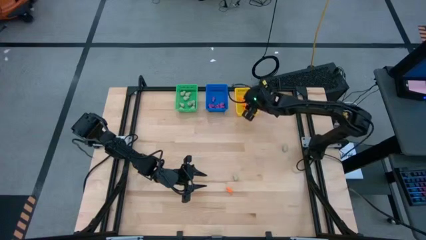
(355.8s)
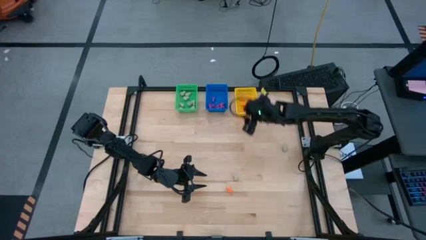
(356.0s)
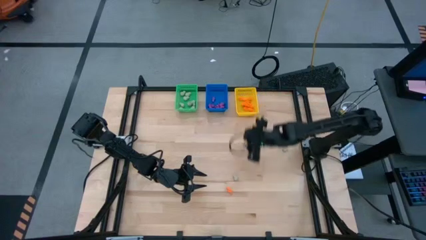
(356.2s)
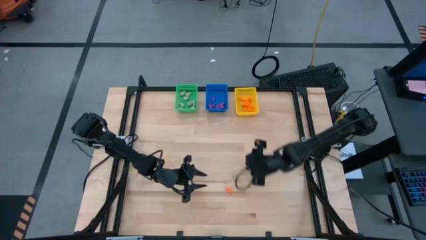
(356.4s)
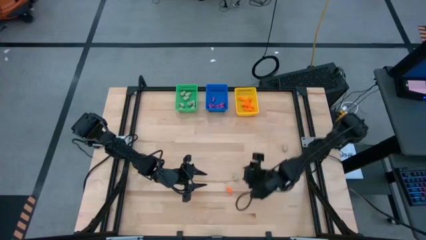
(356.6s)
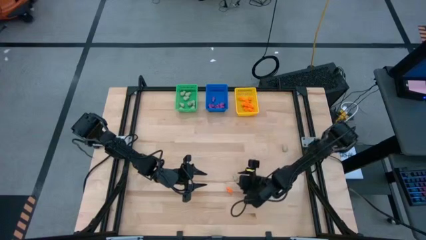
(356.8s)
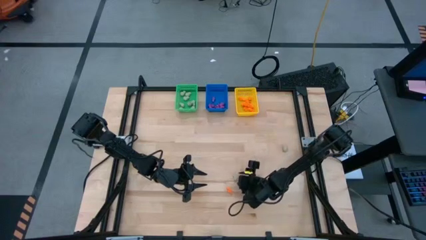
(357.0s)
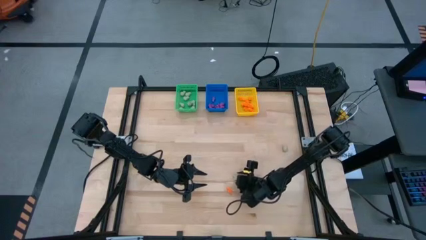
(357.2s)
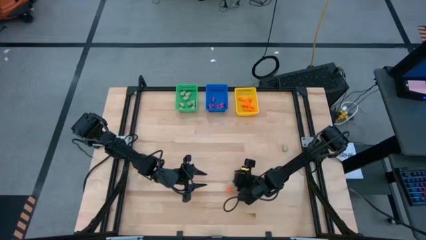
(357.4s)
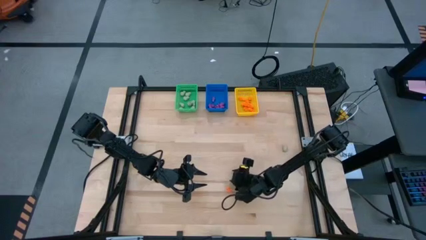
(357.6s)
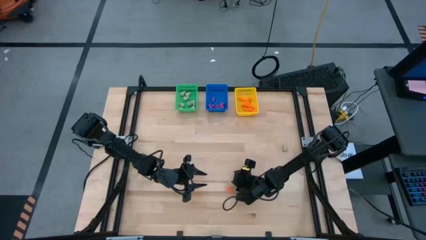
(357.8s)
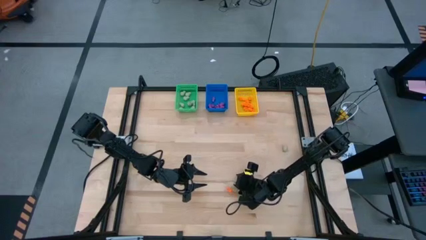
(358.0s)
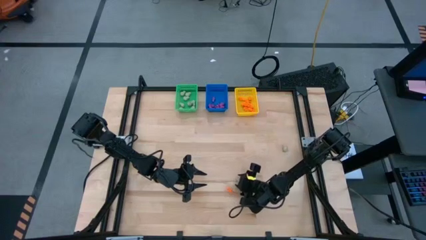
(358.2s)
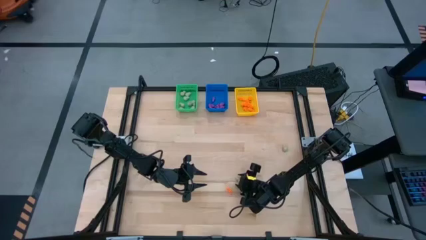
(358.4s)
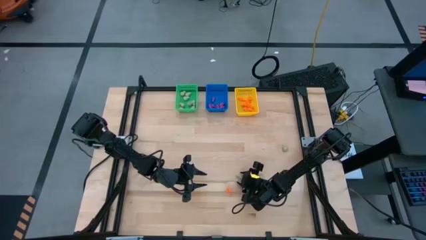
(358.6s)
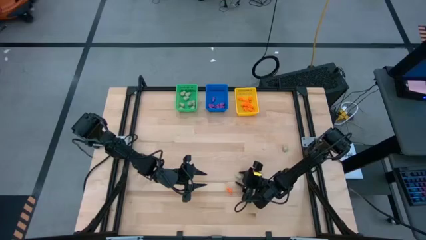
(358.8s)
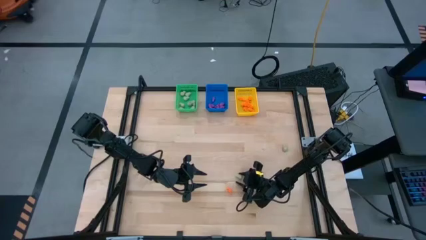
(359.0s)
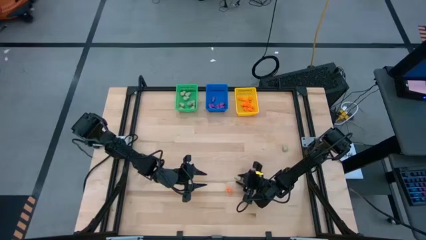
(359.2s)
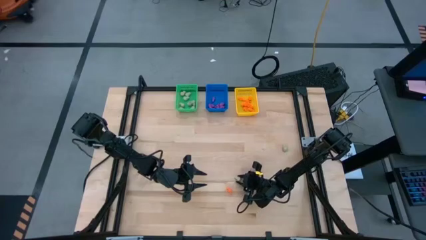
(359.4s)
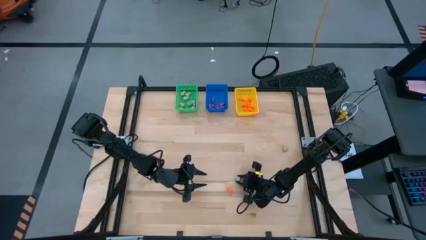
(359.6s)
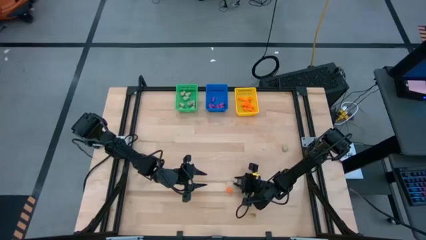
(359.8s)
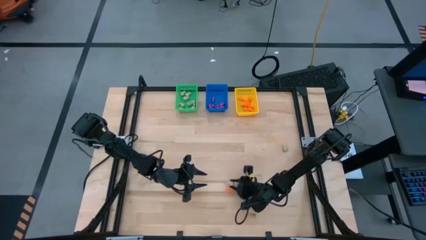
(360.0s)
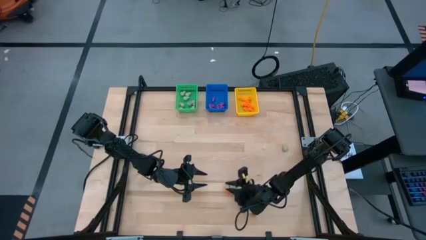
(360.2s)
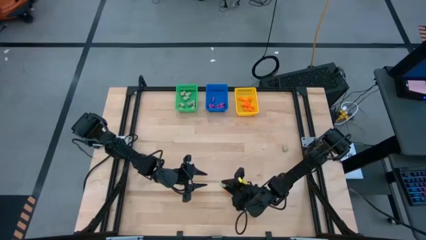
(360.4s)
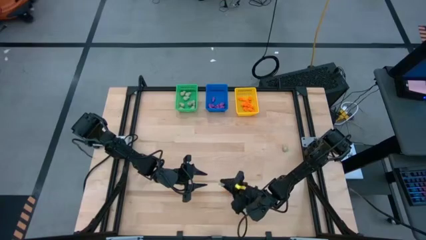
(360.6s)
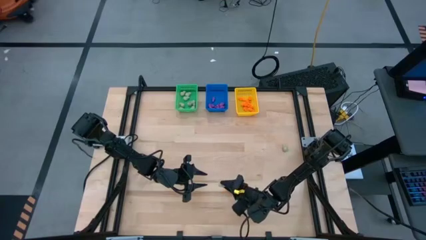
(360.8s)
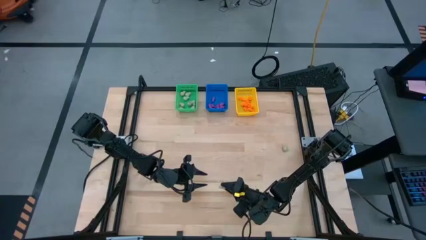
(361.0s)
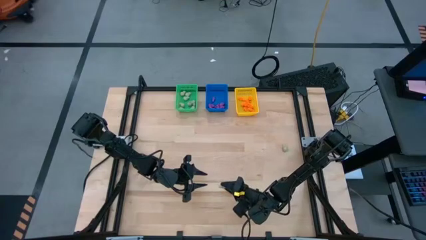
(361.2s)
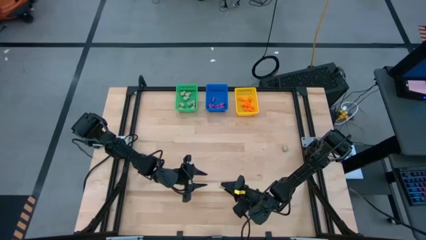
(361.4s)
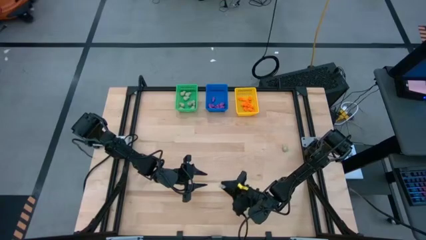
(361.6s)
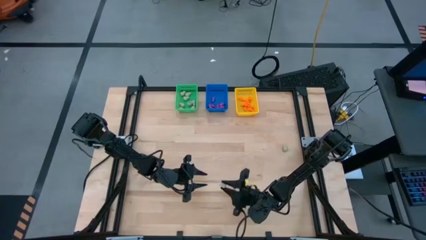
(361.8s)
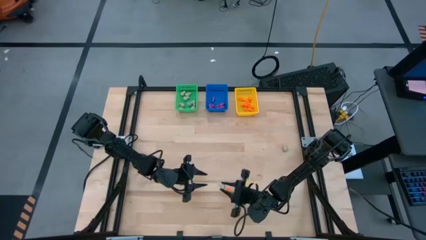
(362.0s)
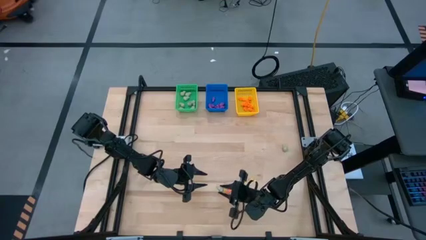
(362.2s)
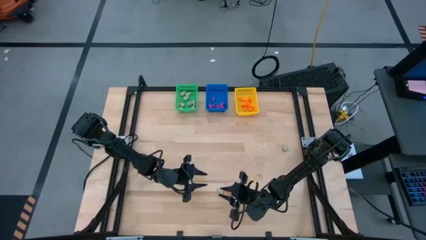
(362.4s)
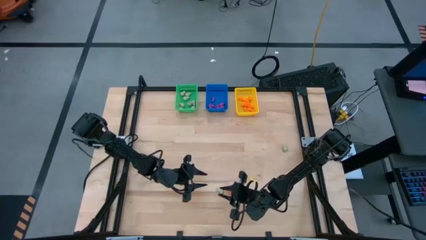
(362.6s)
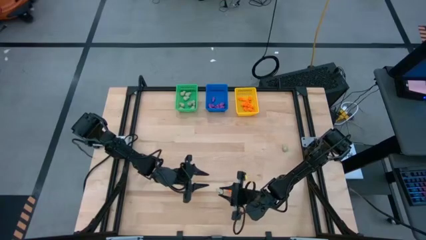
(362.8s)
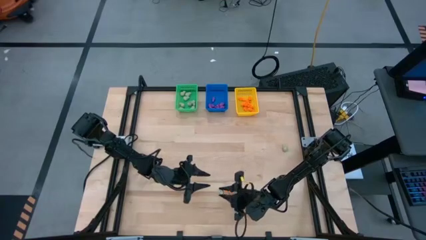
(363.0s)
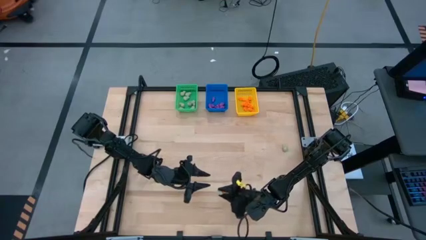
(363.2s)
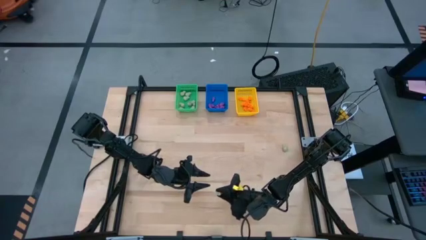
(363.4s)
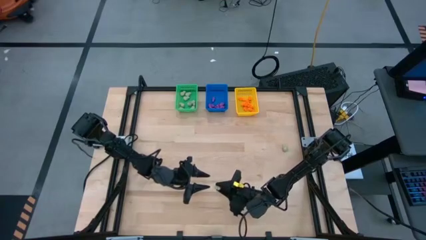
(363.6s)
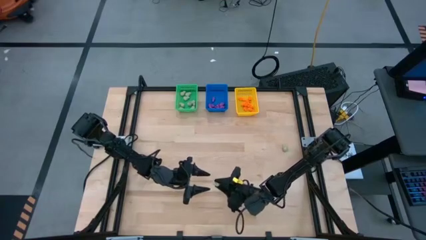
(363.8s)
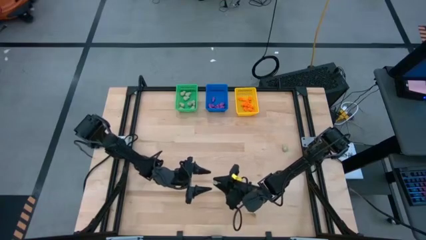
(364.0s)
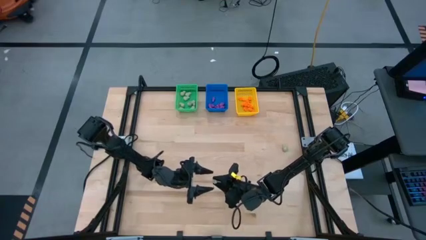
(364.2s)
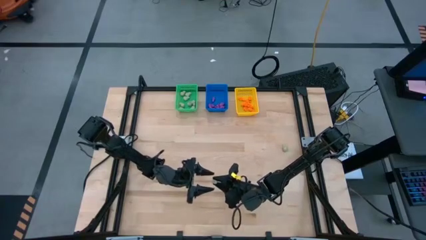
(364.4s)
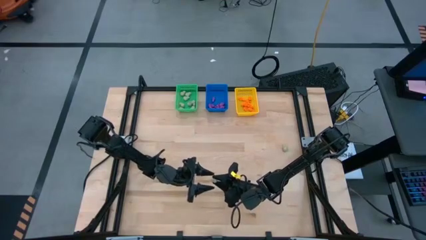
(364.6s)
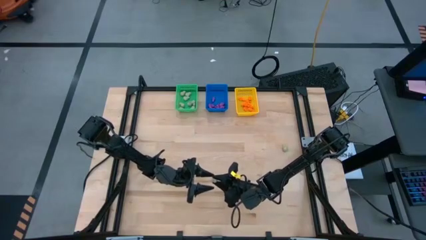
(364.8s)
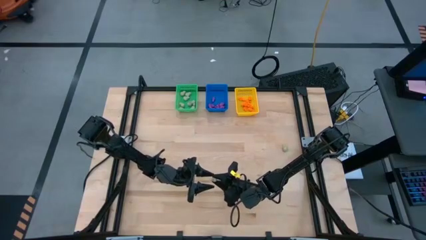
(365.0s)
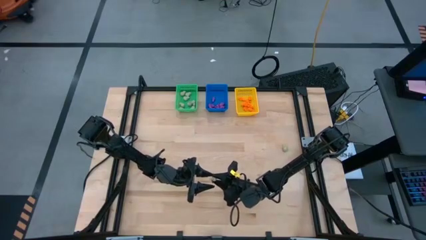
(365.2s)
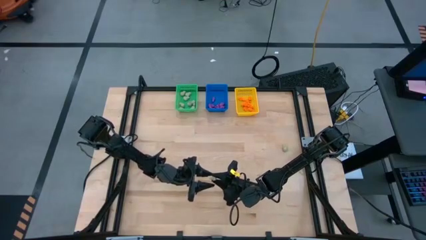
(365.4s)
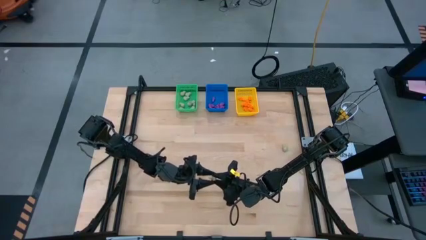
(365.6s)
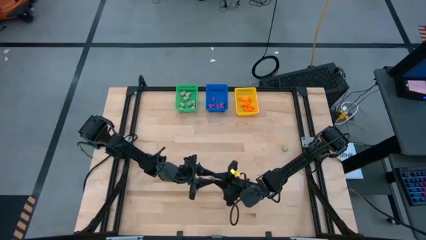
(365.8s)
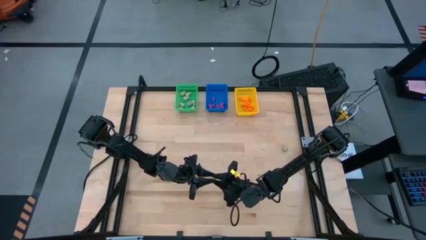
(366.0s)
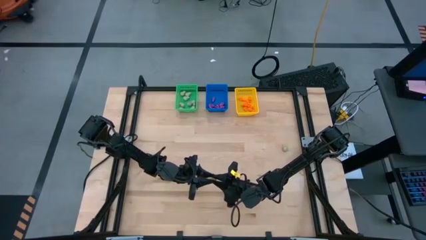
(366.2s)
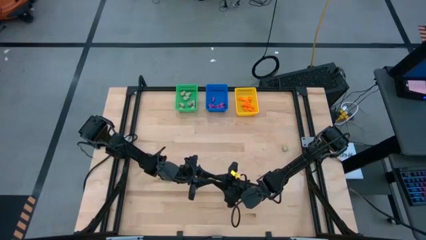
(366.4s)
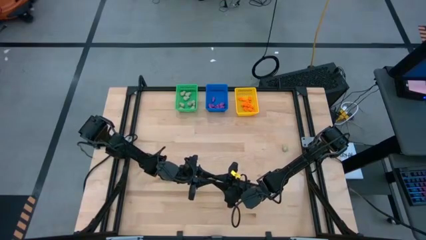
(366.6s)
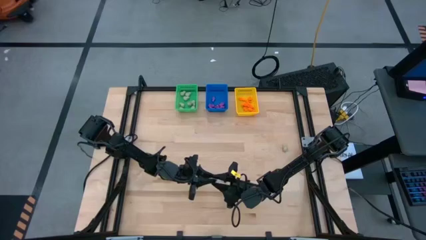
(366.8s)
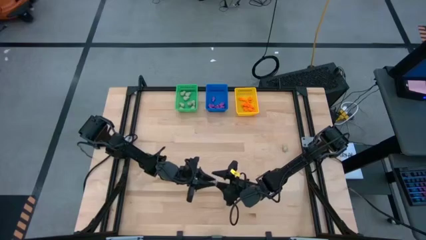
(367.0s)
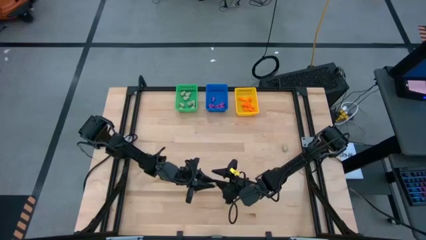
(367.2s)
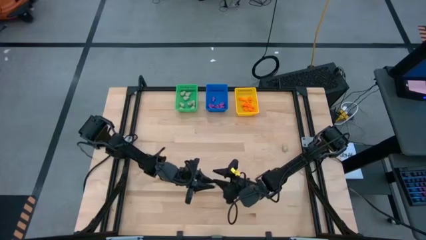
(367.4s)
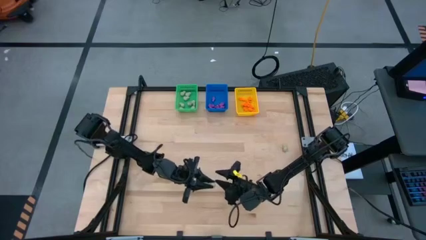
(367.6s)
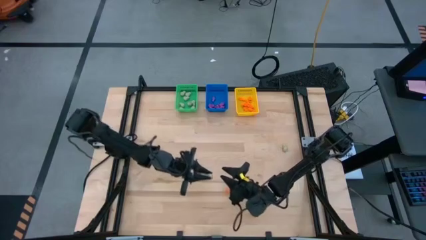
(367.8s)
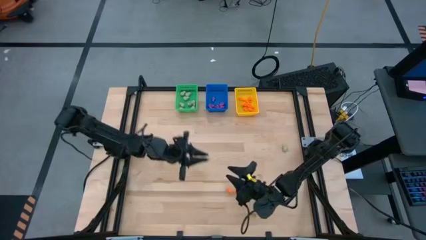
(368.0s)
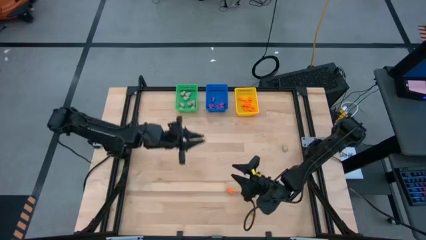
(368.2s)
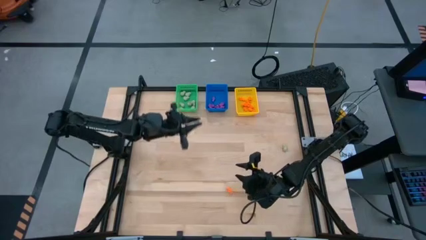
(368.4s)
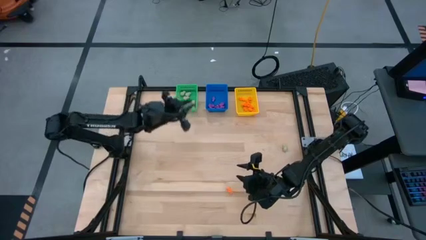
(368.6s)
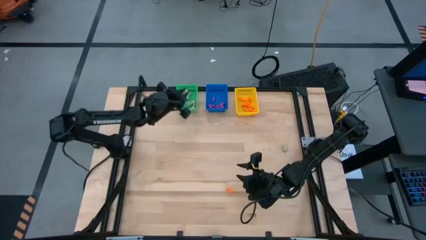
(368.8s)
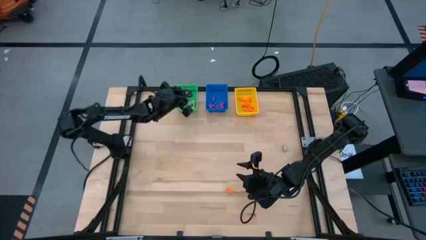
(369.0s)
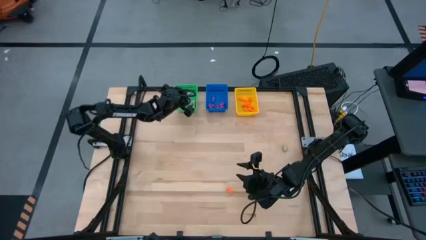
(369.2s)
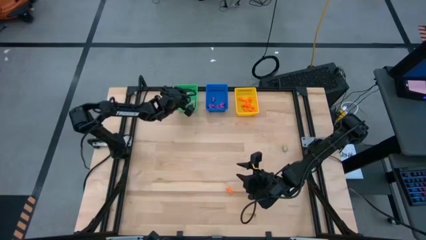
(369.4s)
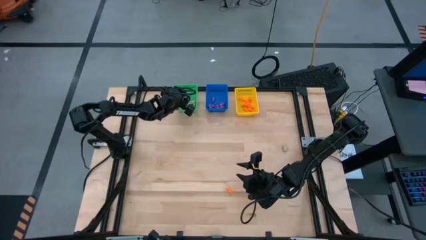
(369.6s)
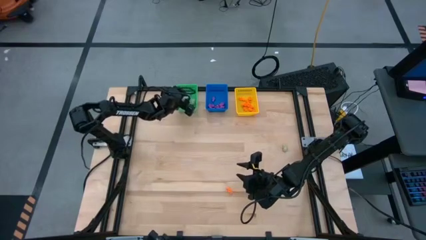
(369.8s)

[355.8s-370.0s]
Task: Sort Halloween decoration
Put the gray skull toy into the green bin

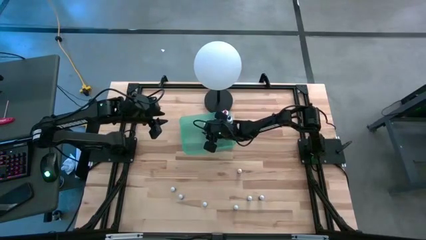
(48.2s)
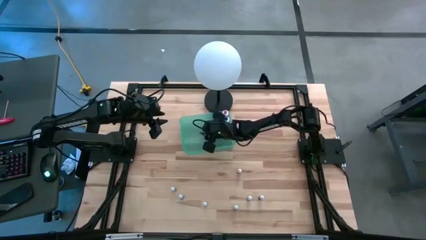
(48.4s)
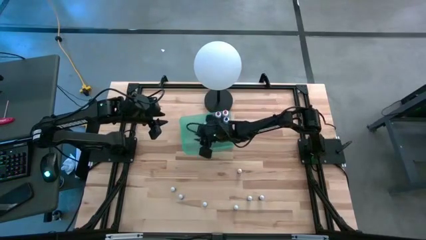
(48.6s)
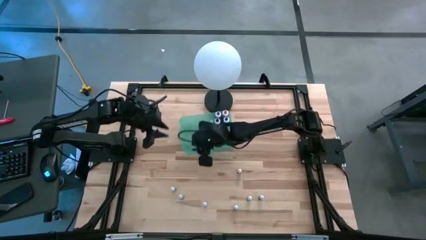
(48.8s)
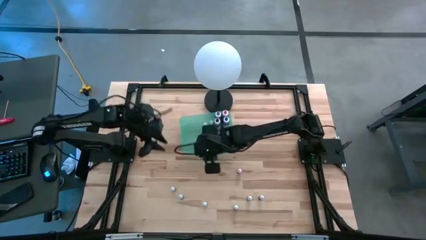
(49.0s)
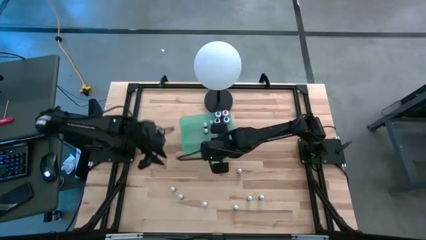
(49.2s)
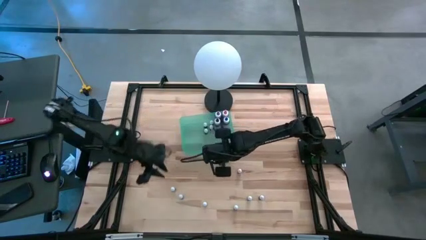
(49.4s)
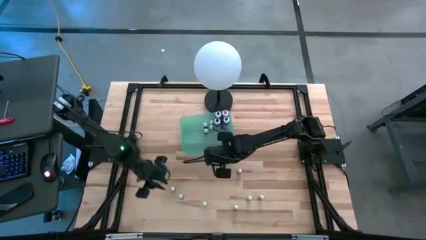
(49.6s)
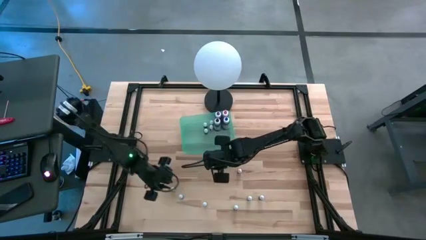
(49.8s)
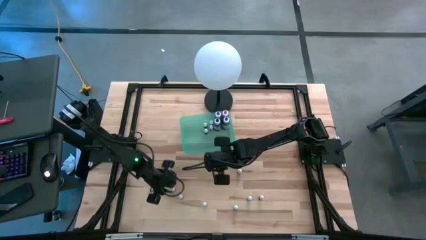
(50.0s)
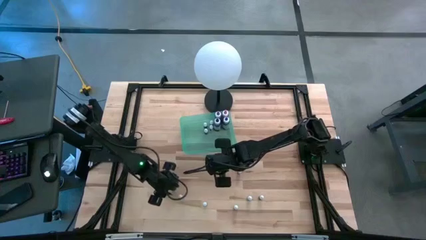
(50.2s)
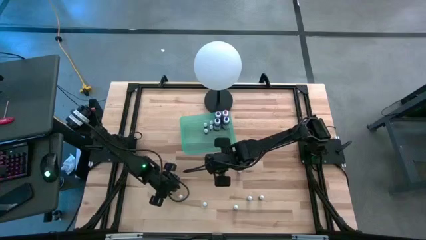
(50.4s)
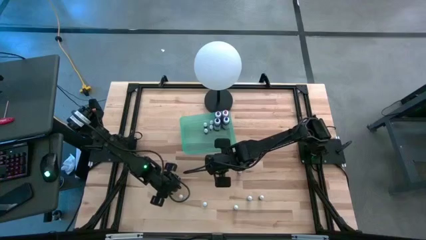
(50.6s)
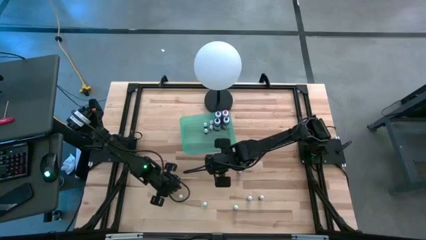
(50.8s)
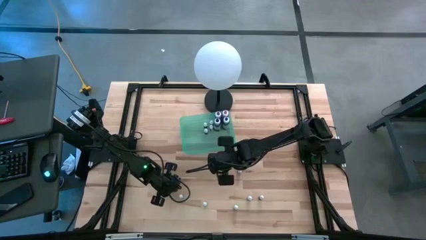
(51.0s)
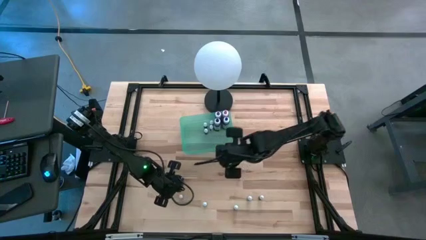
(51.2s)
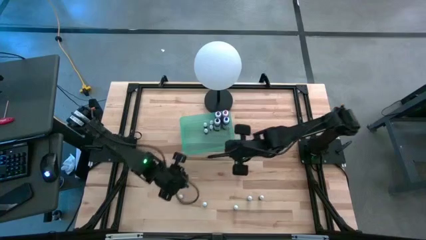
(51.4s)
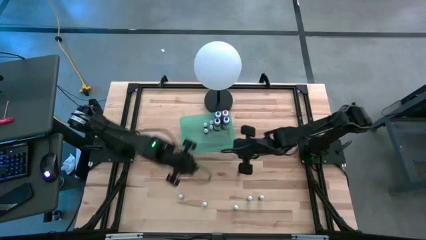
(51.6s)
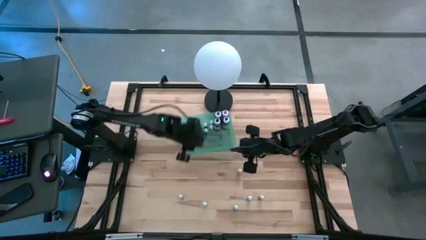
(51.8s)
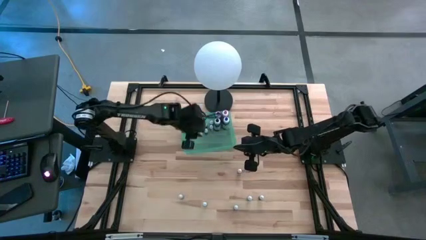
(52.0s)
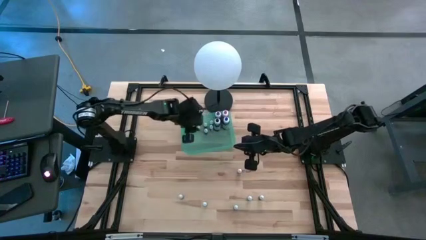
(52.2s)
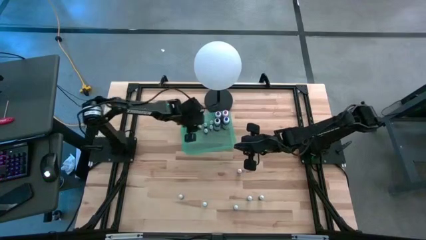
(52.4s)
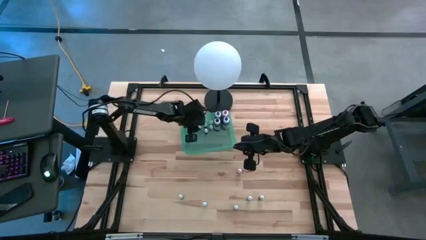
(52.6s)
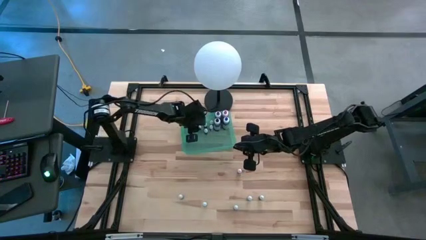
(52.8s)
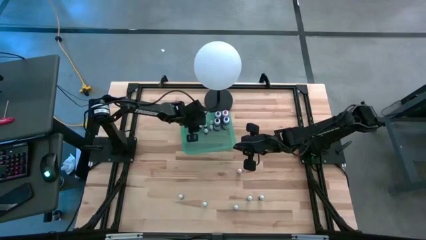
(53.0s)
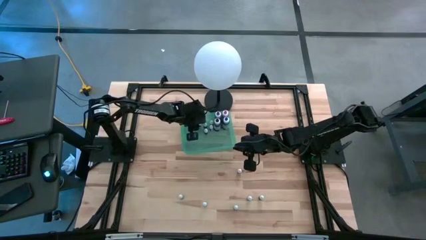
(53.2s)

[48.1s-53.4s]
Task: Pick & Place food coloring
Put the small blue food coloring bottle into the green bin
